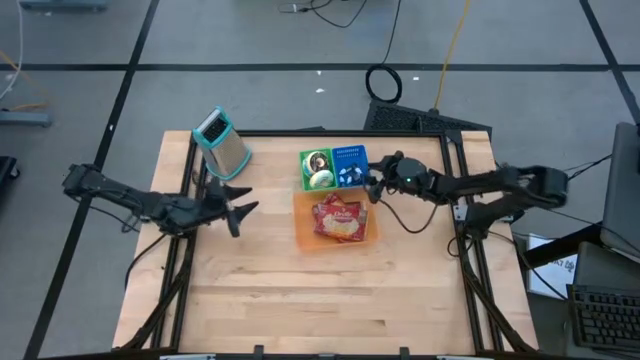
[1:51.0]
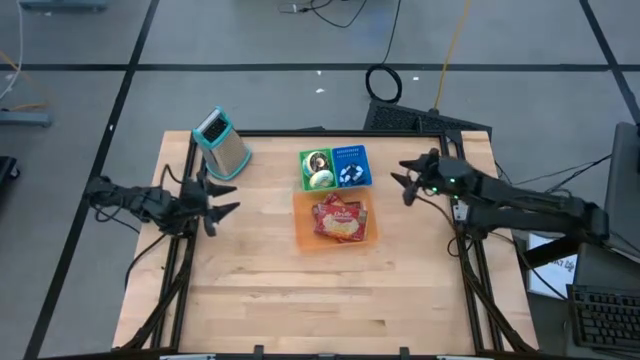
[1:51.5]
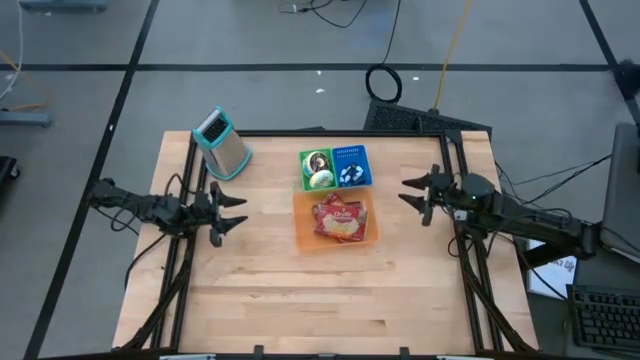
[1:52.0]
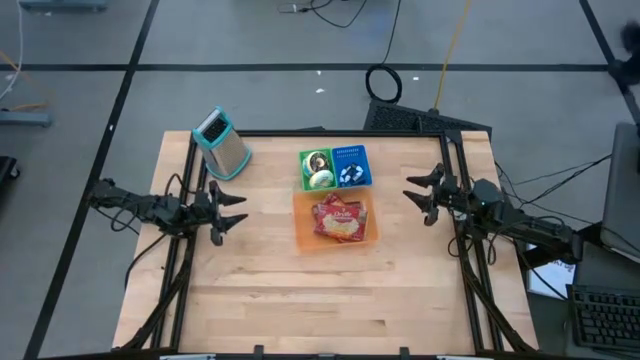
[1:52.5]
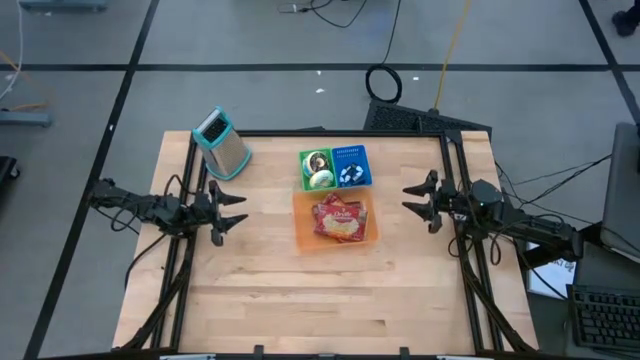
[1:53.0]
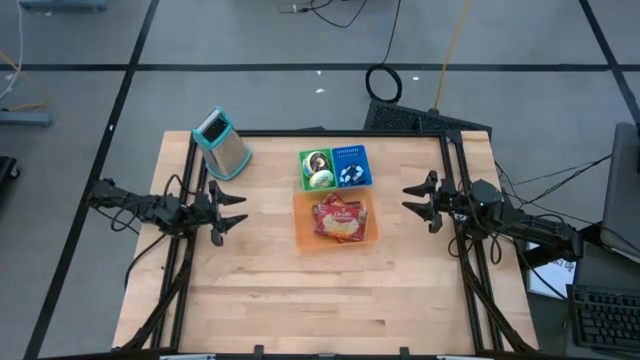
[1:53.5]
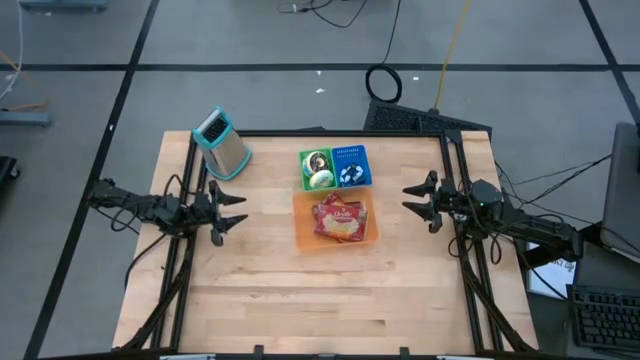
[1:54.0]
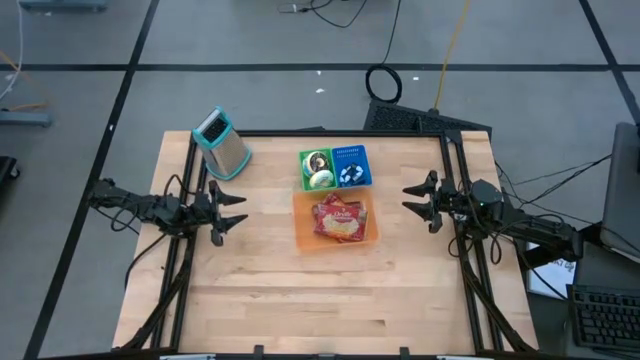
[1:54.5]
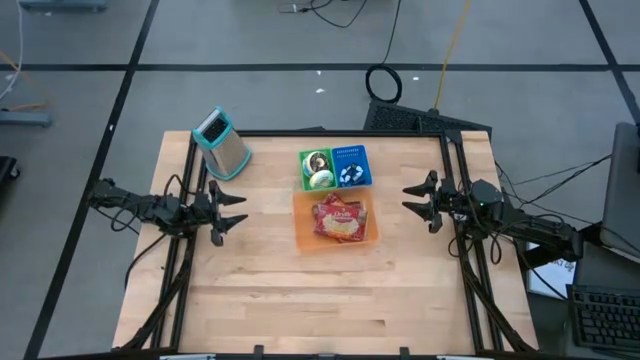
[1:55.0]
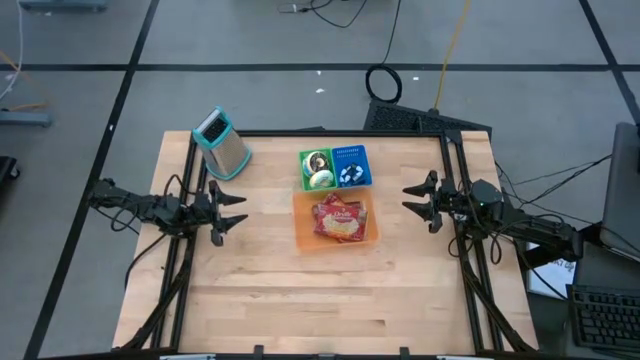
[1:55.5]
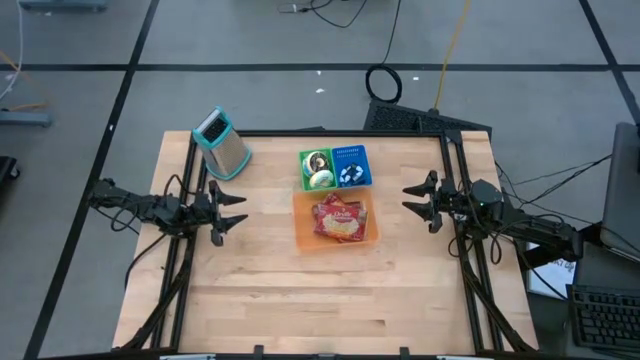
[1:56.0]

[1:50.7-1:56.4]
Return to Home Position
